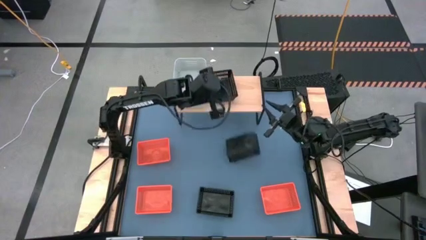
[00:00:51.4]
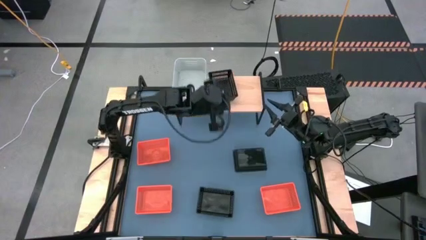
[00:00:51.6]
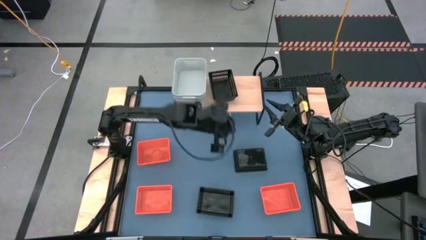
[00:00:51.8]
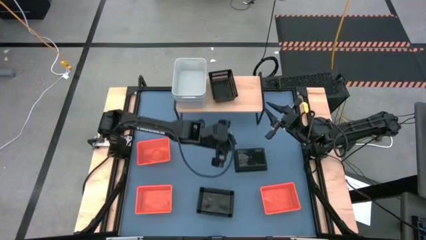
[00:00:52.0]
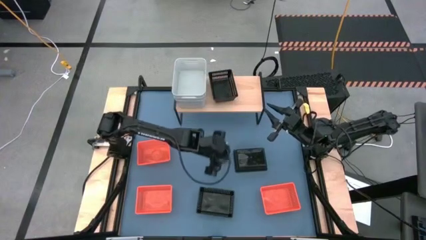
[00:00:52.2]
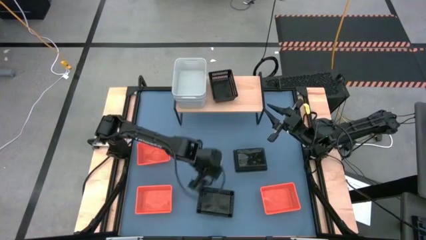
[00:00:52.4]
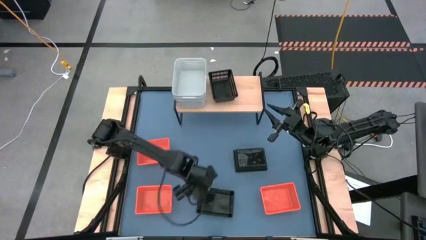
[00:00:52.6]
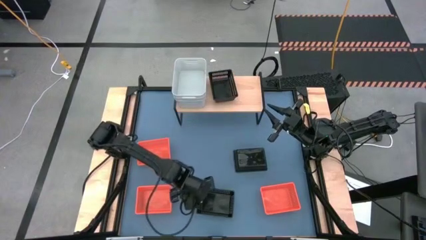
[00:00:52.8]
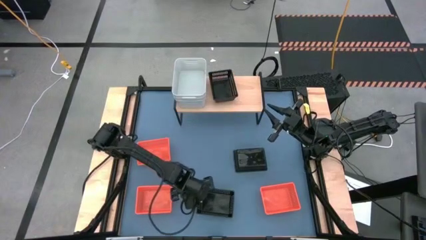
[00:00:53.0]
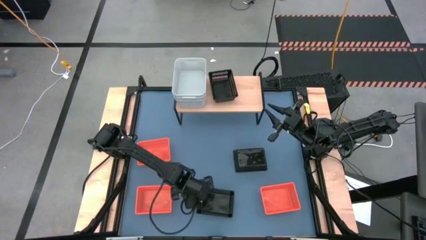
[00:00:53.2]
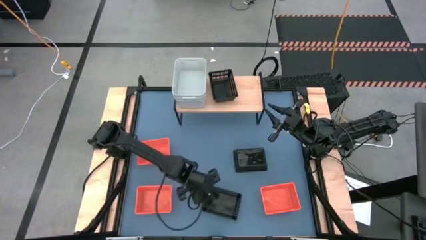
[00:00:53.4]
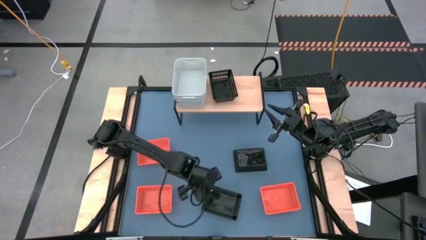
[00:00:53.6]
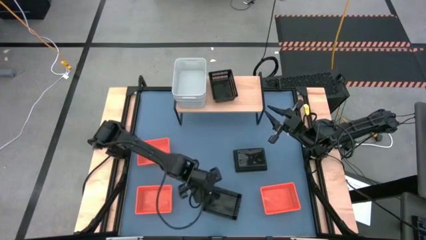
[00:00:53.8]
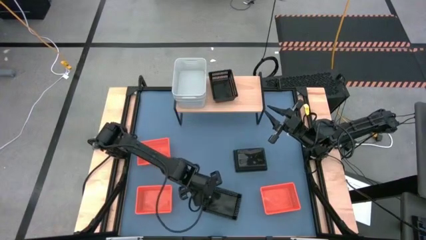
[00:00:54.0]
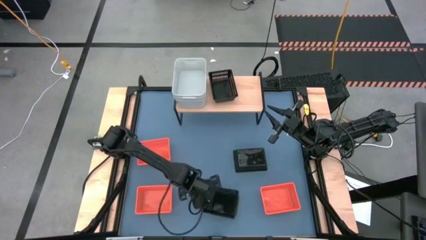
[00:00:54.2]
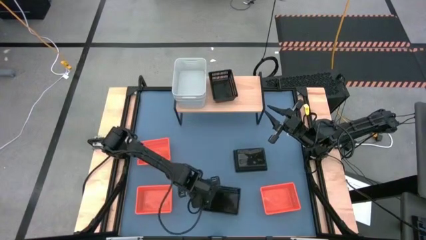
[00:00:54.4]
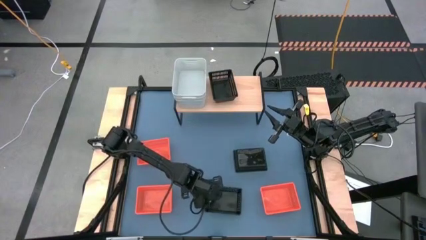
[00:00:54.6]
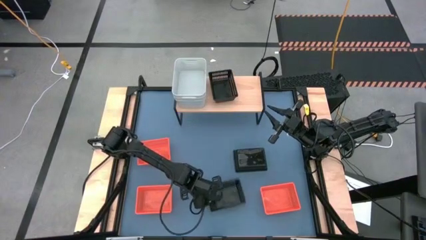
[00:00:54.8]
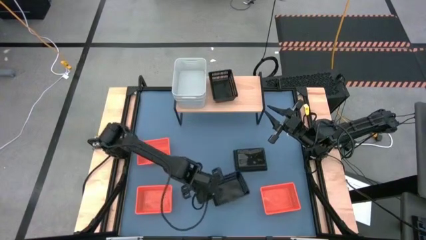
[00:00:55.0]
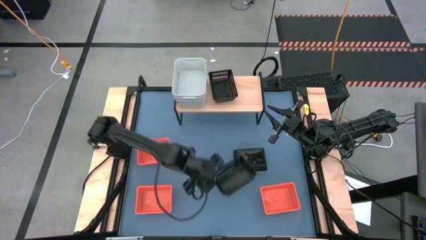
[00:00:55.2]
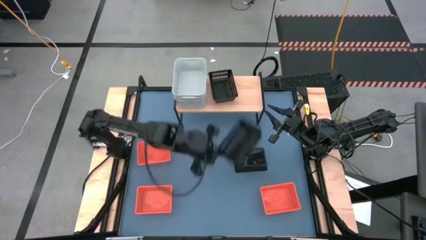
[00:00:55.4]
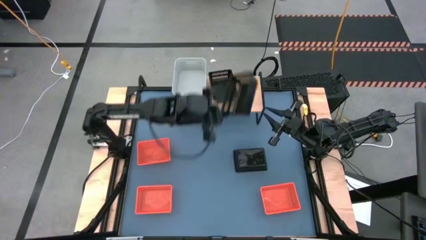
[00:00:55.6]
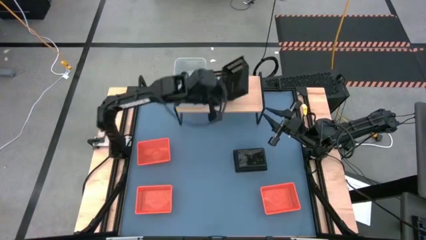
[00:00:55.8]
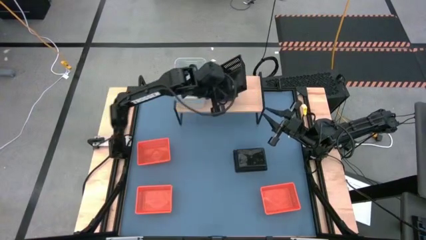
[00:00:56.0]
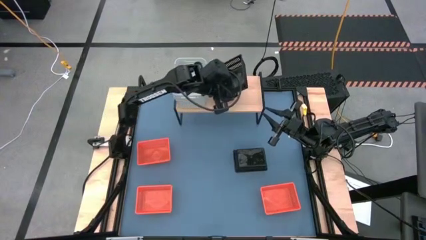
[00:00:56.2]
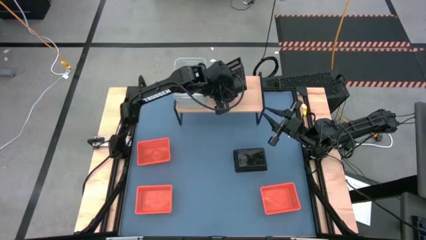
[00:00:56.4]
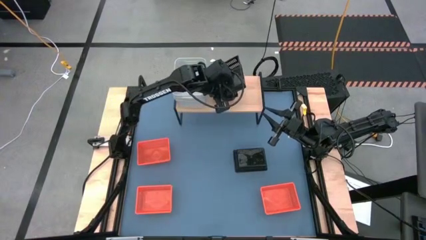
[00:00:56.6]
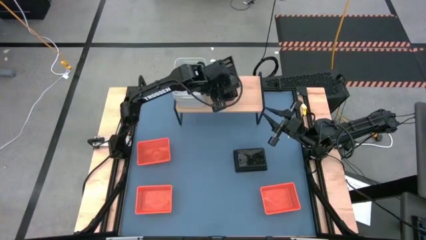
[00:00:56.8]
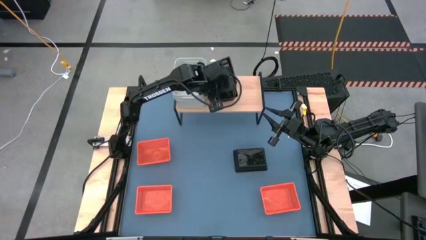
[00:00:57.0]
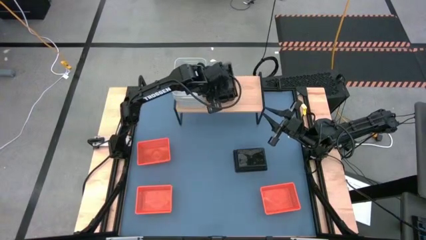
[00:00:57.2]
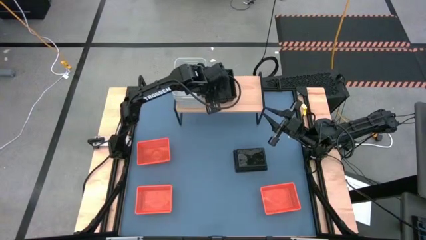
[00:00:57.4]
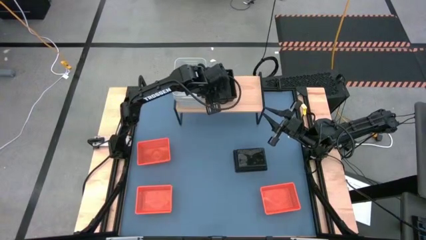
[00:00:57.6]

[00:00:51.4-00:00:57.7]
Task: Stack baskets on shelf by color
Stack the bottom black bin on top of the other black bin on the shelf

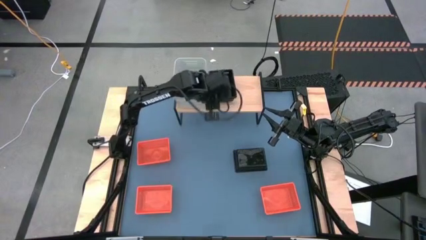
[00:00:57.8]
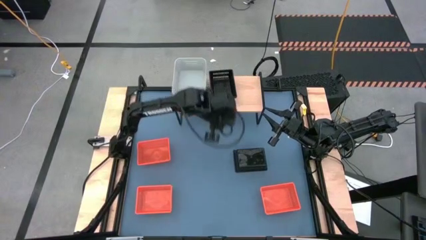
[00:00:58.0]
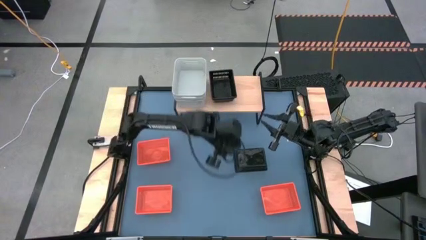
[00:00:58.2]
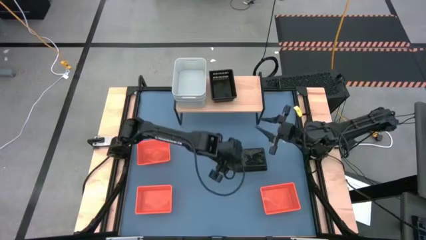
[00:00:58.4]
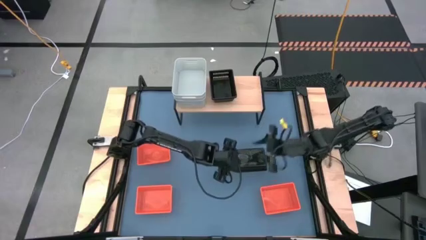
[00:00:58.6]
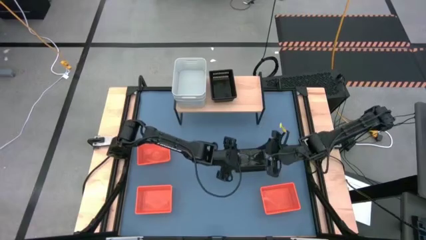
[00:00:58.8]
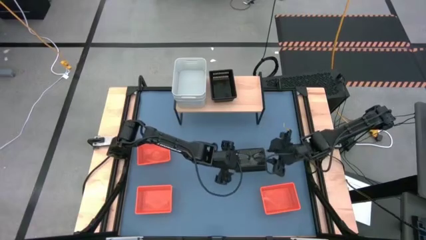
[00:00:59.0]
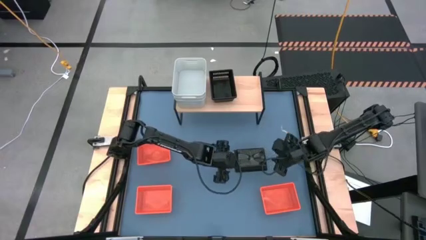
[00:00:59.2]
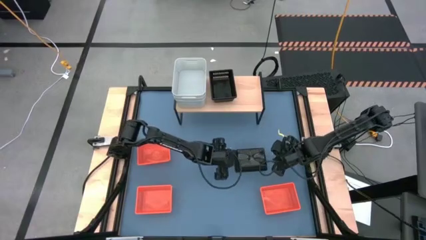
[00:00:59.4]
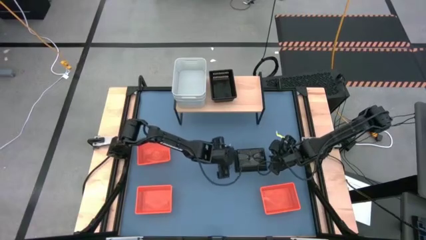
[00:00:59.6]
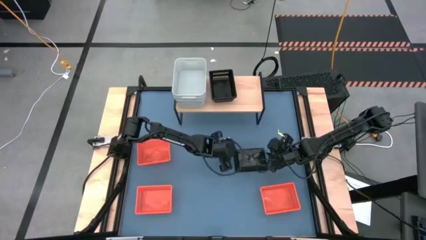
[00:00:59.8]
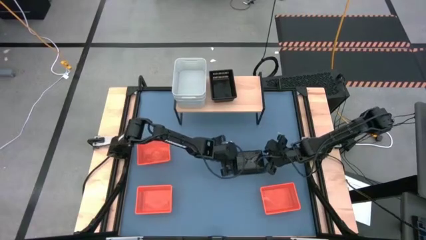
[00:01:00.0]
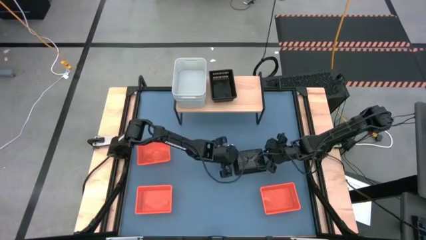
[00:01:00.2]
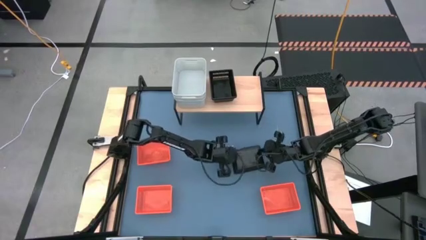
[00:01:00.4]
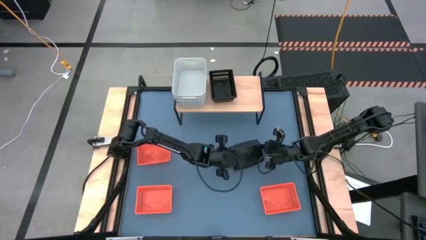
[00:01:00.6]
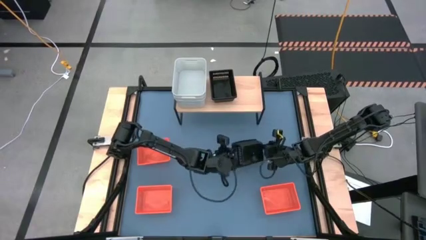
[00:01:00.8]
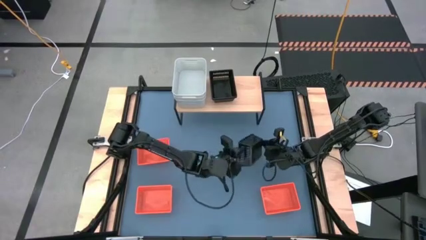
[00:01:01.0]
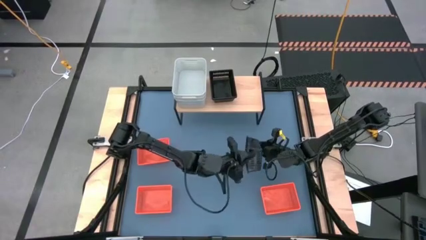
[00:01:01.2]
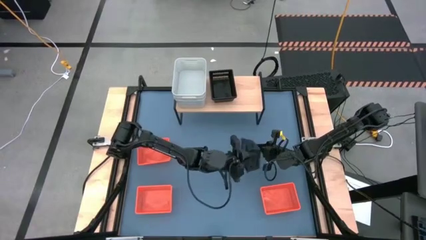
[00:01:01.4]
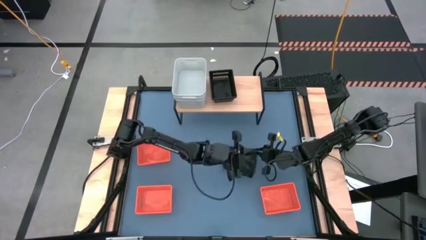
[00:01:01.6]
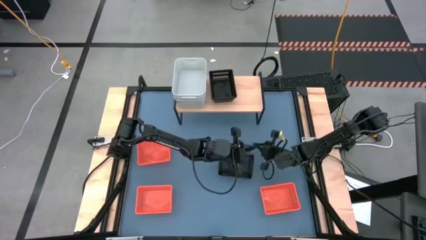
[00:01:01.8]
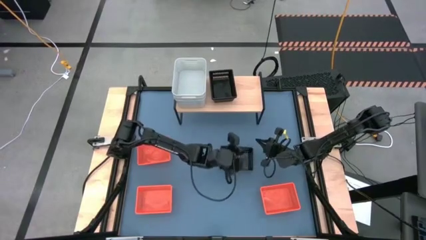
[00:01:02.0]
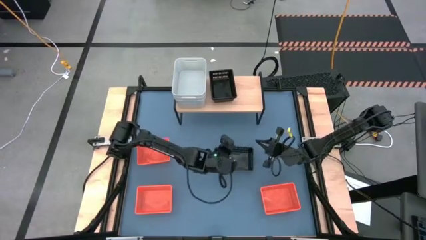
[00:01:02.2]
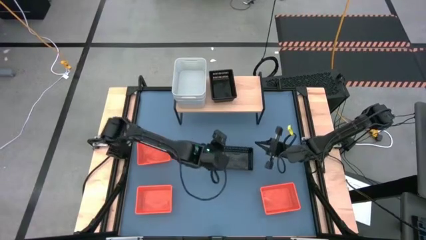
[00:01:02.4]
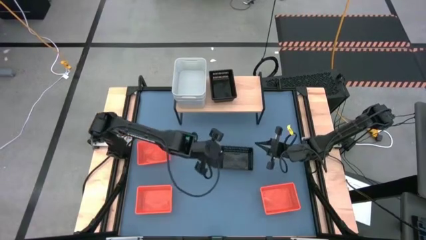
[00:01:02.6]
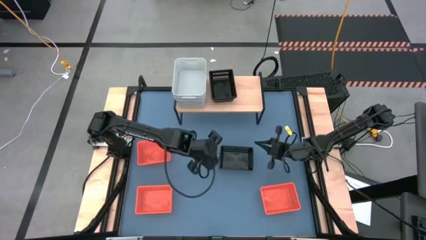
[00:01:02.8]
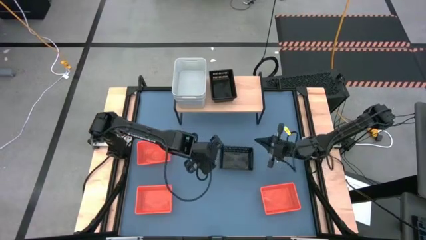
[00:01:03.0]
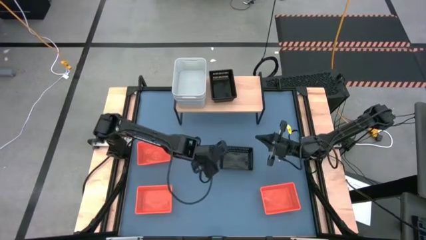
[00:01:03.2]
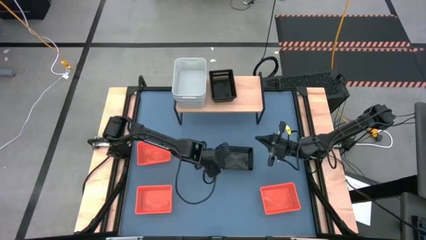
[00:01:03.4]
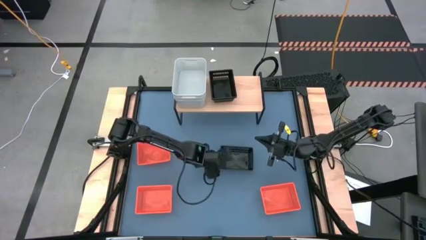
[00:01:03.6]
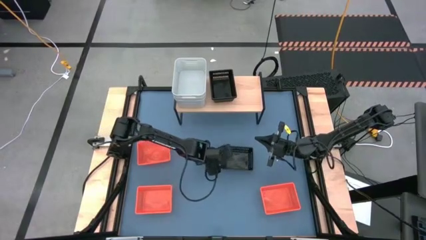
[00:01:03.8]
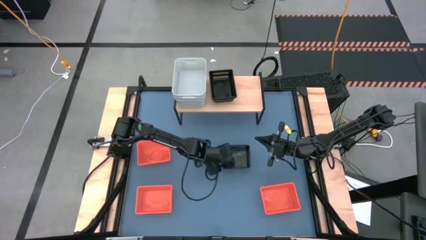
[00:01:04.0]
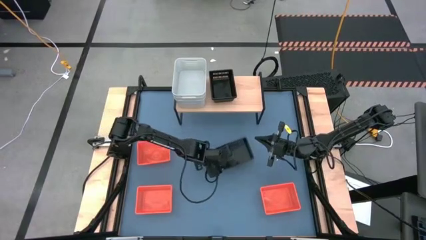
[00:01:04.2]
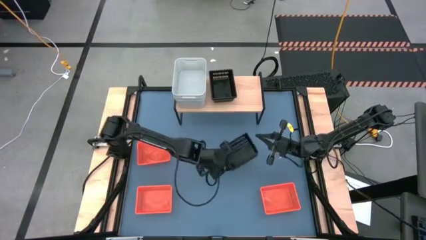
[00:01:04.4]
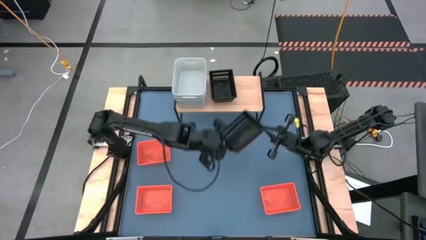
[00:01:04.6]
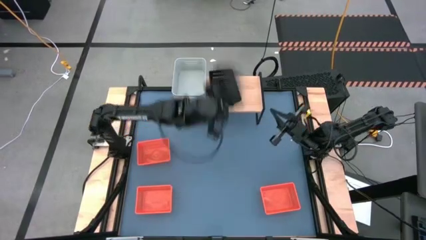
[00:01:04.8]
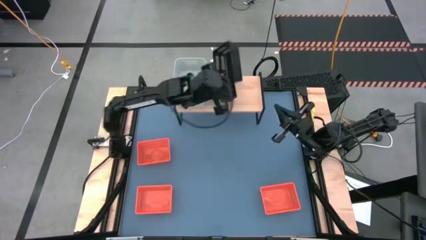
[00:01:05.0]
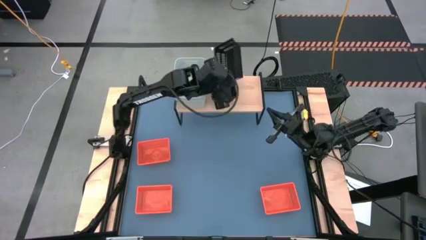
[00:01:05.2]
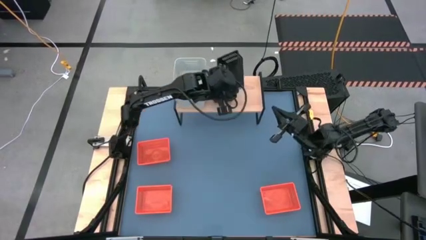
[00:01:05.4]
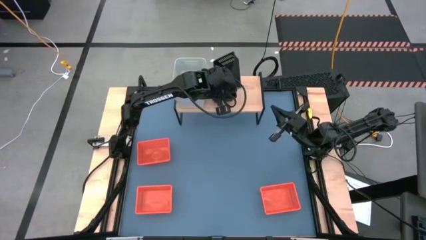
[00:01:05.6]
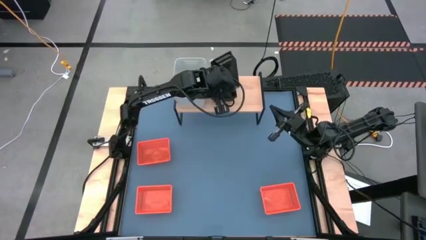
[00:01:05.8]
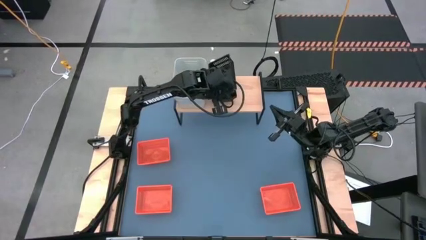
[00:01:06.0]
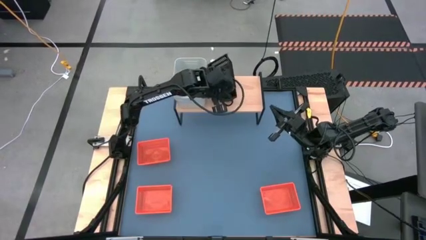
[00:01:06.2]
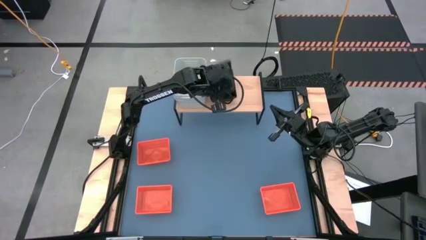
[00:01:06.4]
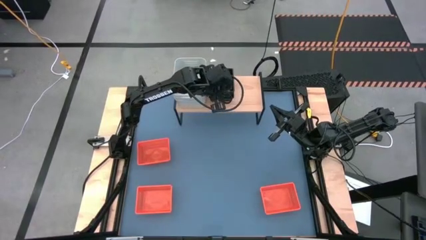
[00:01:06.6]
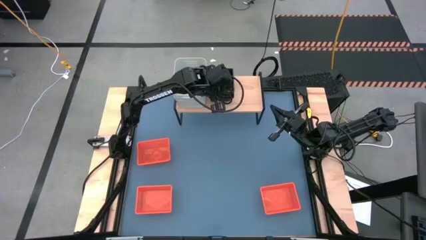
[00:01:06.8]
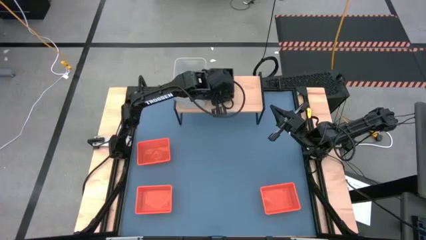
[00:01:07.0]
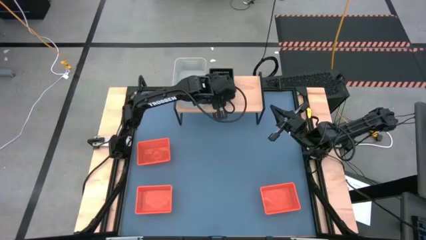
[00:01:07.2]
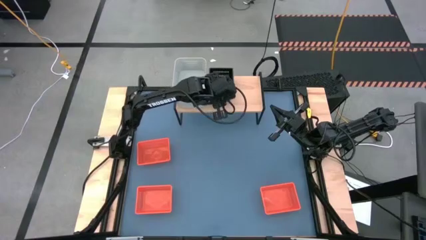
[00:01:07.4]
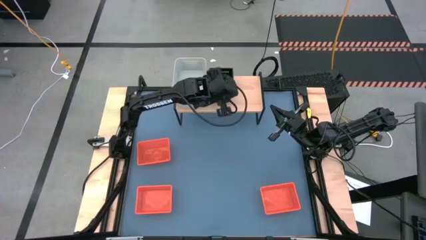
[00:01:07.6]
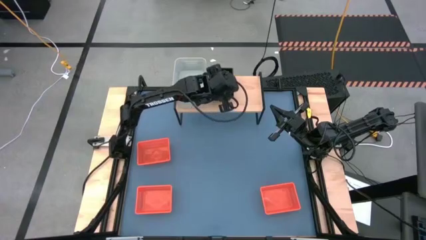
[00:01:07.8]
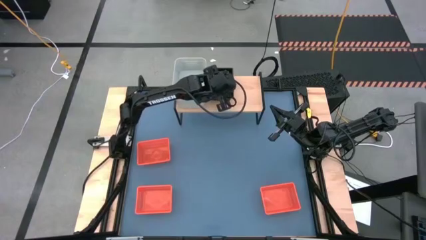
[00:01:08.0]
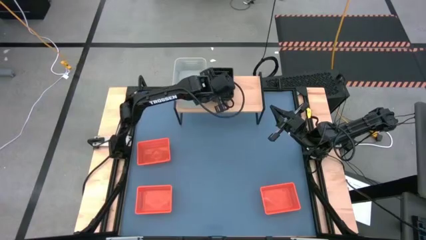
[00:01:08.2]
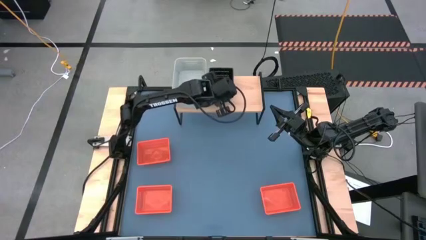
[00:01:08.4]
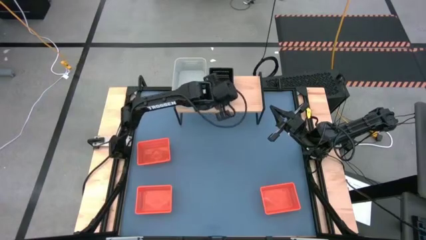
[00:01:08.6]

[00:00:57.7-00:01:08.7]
Stack the black bin on top of the other black bins on the shelf
